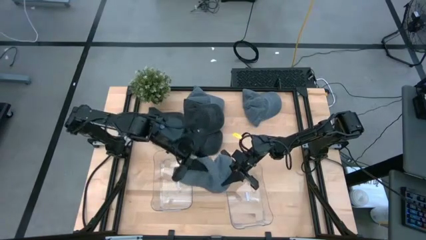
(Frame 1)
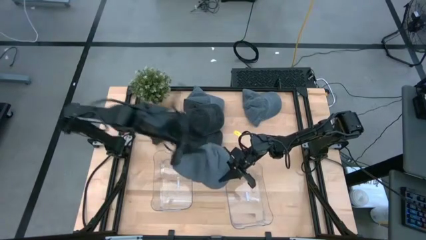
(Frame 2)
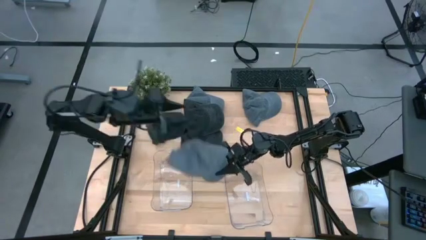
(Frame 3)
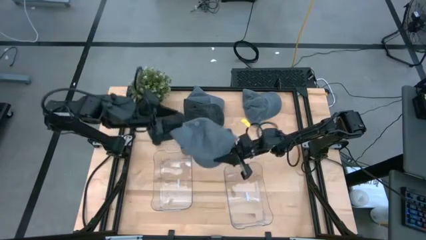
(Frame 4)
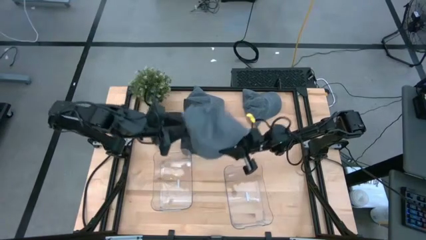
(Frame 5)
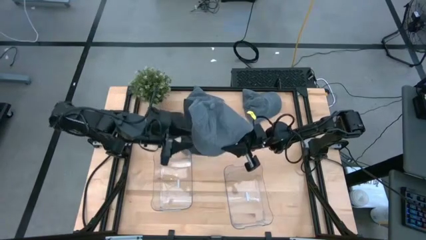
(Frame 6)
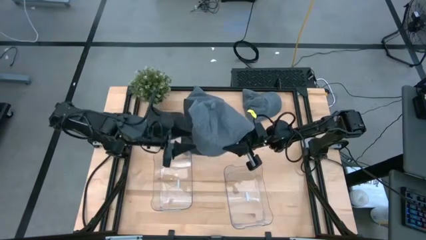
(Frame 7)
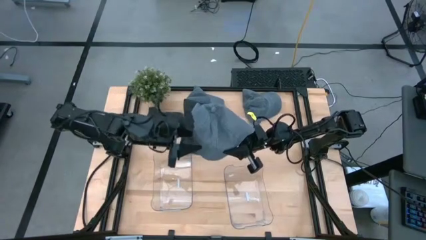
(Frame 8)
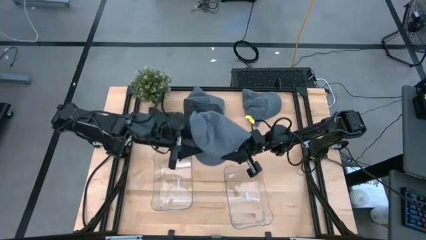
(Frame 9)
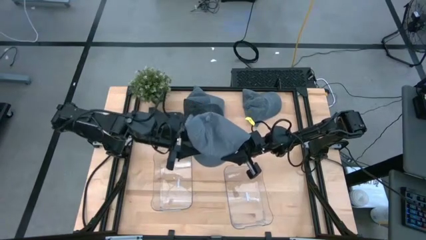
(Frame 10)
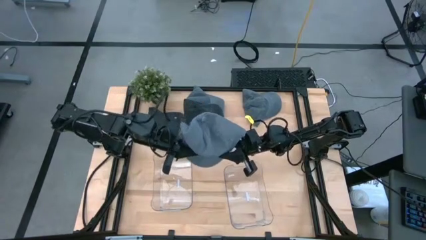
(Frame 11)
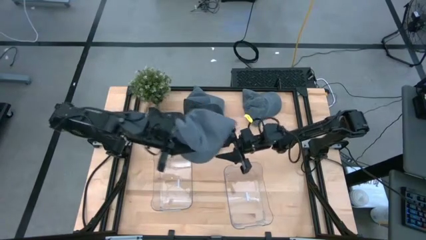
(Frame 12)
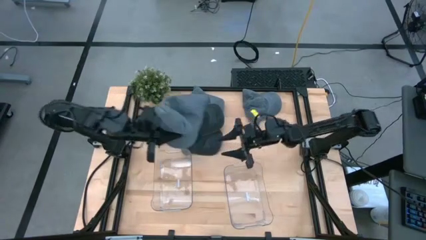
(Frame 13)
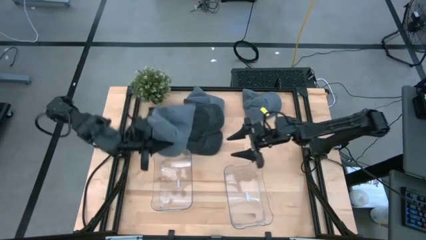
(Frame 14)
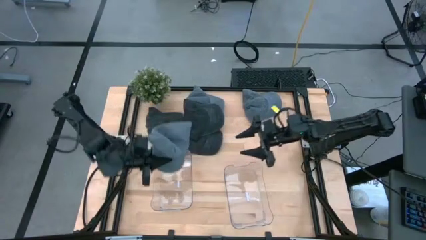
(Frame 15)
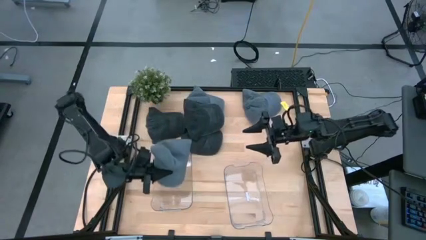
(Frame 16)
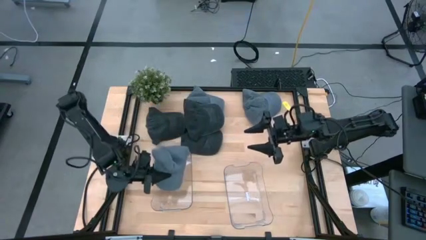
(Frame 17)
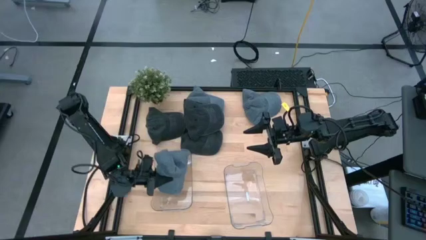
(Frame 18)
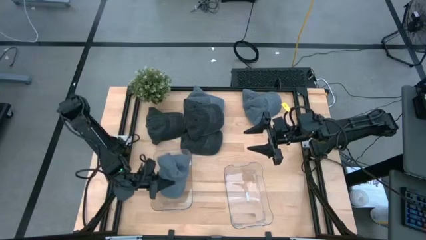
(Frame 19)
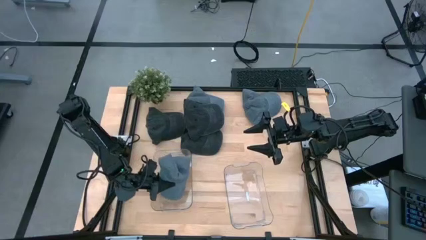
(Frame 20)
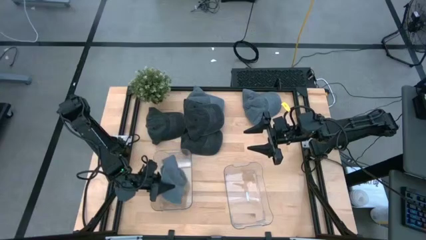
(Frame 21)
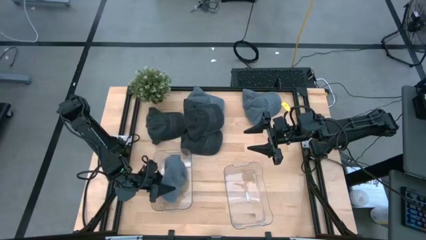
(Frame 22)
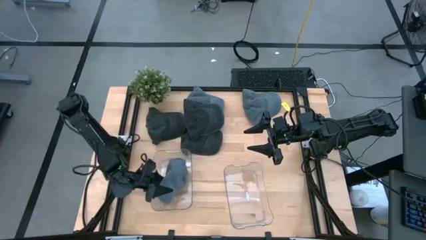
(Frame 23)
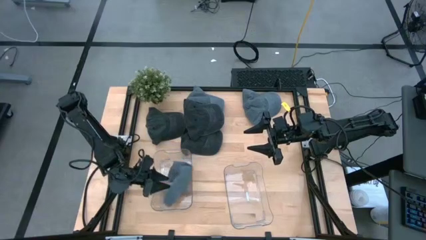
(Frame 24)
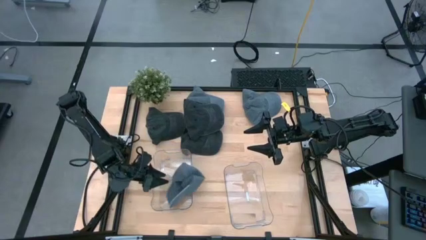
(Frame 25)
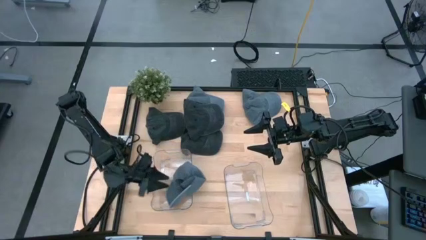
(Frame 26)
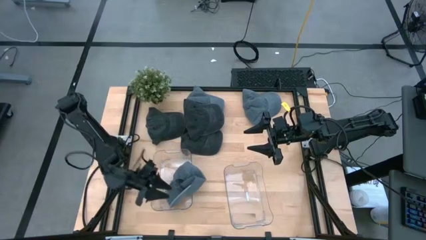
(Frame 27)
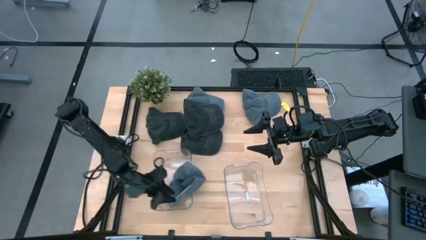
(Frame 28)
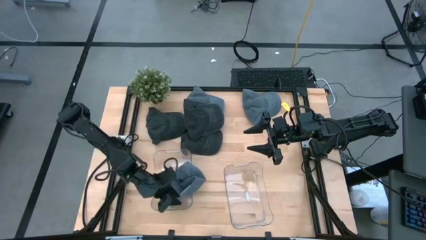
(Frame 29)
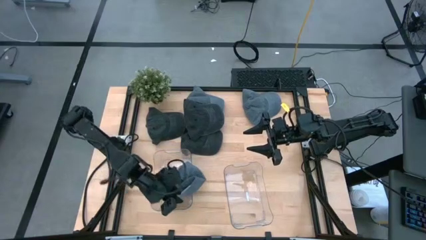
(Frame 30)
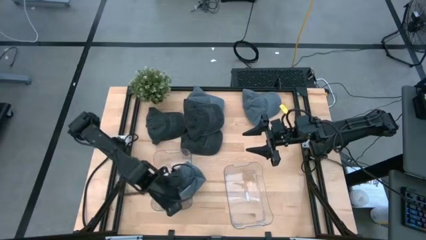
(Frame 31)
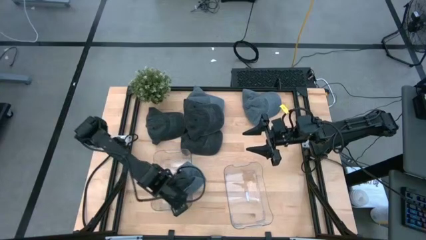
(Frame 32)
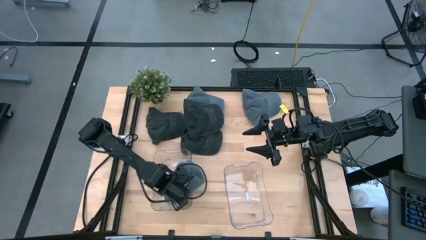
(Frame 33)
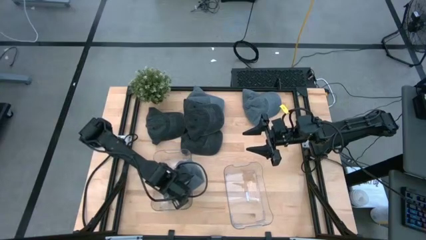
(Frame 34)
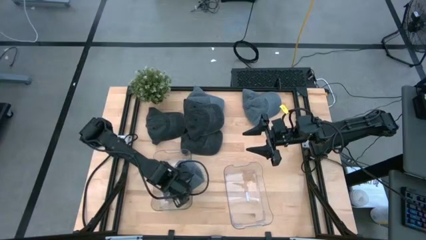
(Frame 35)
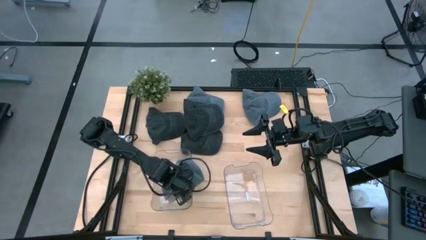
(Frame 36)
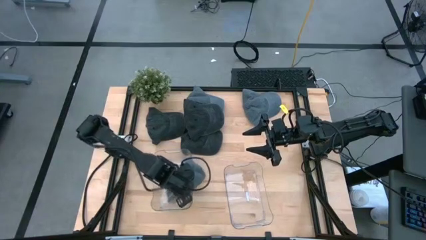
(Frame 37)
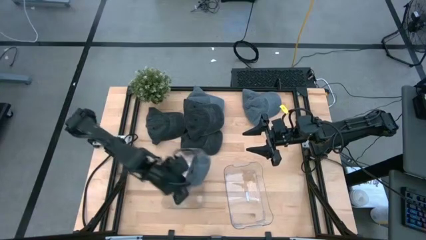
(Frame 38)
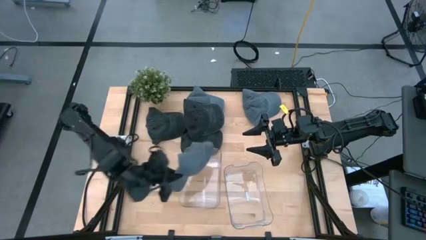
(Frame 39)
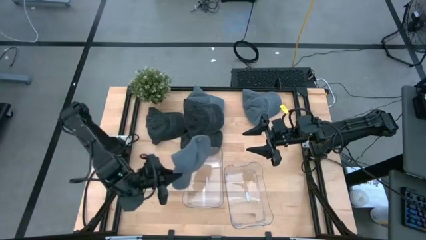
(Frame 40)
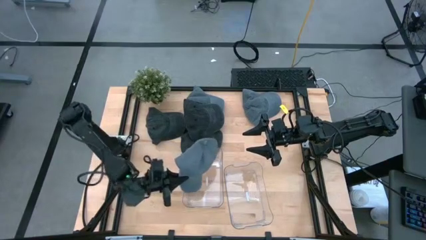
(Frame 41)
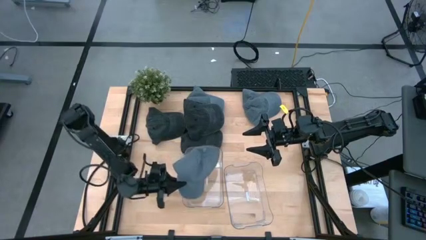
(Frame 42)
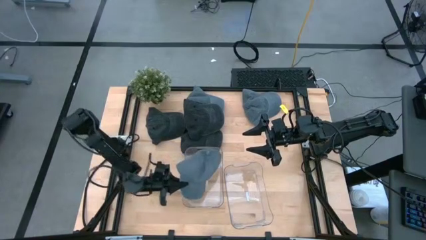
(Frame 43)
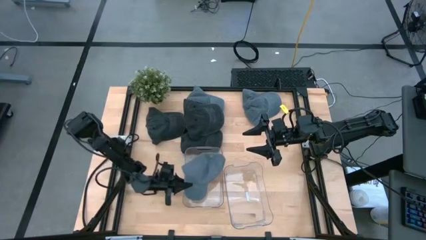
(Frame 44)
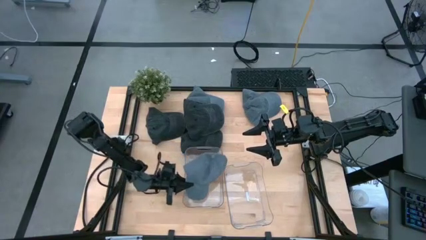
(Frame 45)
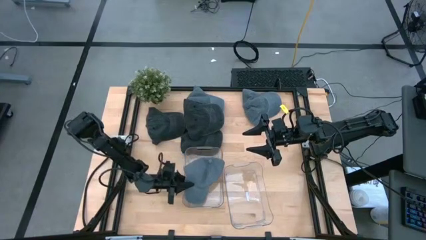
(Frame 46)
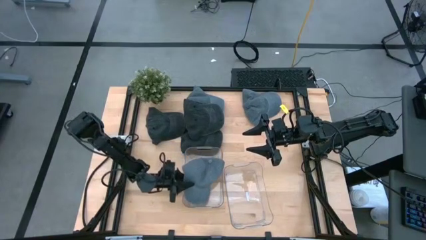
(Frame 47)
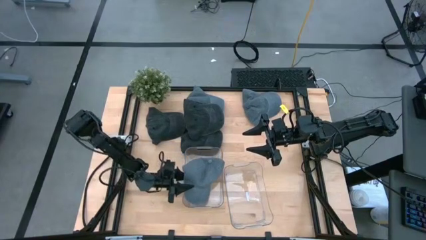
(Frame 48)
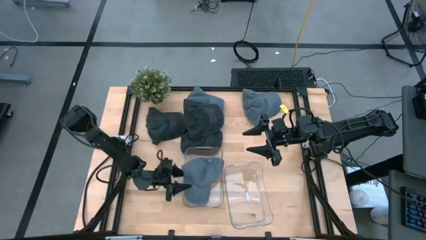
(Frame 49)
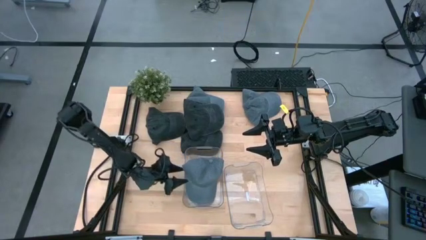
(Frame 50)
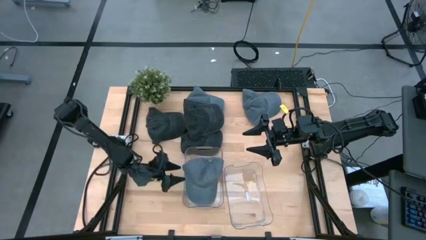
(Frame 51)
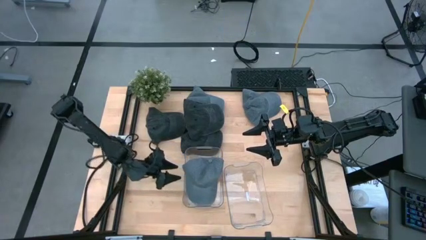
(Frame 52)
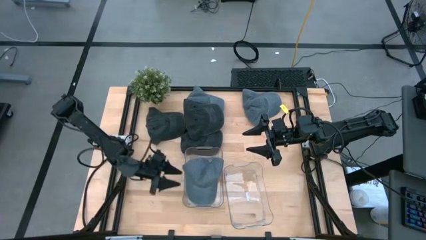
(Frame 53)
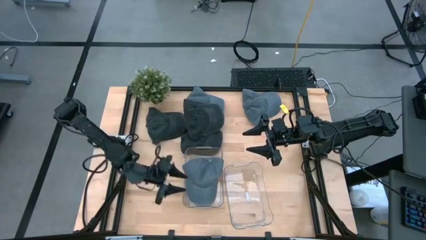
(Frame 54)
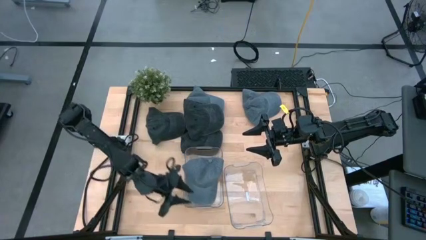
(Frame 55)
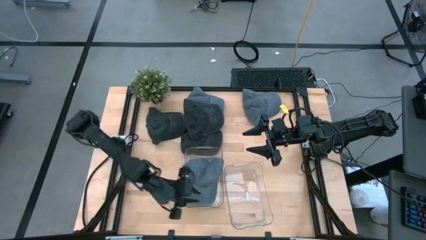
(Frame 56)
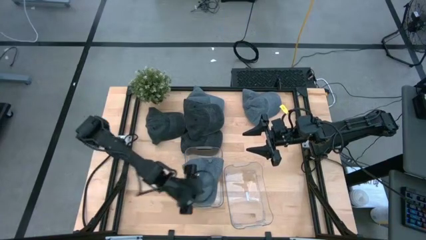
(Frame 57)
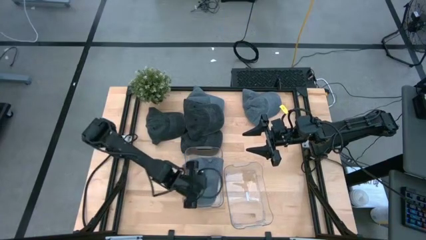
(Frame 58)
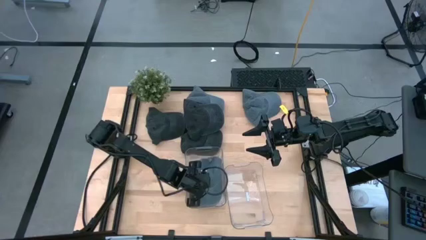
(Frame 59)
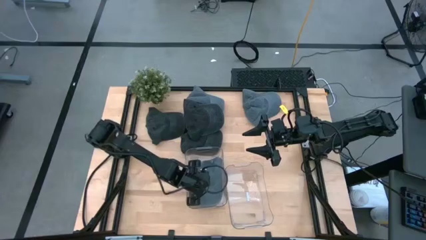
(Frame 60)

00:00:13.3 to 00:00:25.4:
Task: Pick & Place hat
Put the bottom right gray cap into the left transparent bin

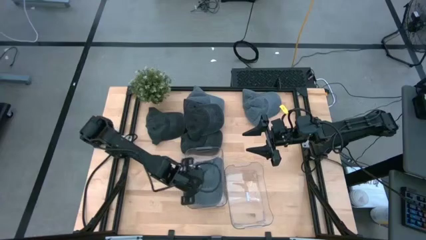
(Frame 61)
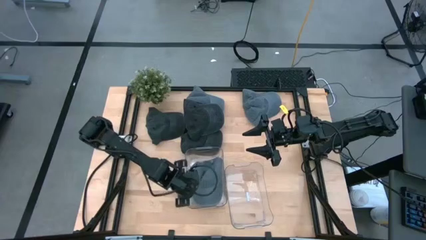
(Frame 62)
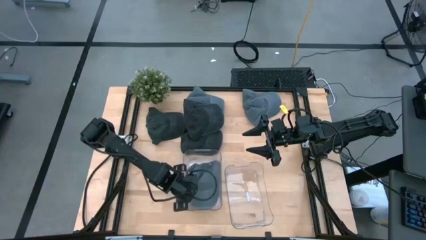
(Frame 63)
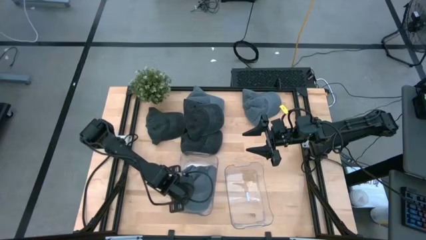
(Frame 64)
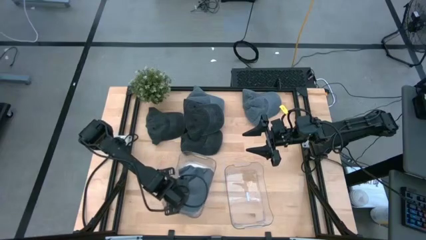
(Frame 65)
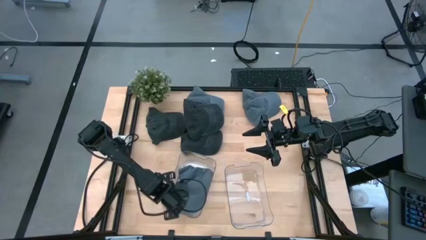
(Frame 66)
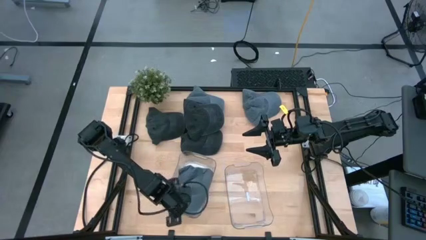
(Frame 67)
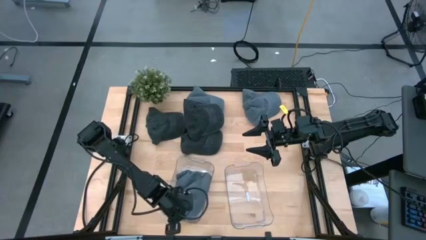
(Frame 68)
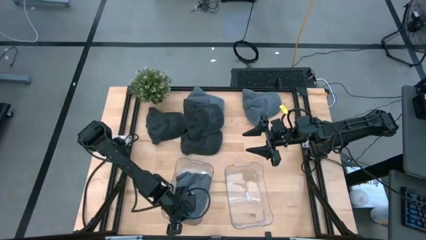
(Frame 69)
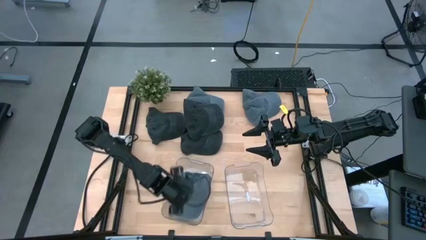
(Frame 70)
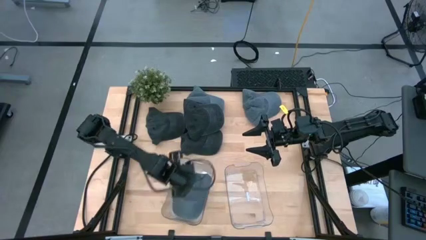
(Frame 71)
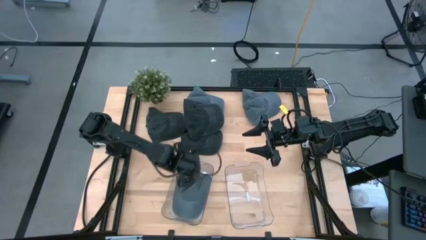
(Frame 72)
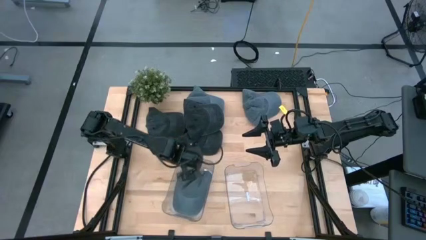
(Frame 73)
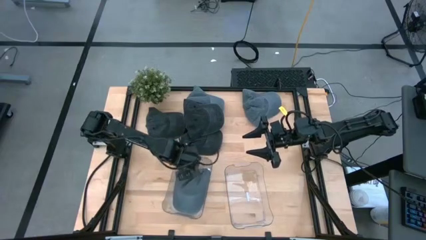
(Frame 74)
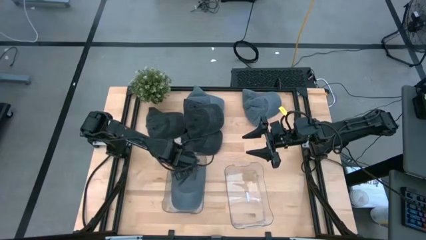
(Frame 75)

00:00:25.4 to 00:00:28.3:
Adjust the left transparent bin
